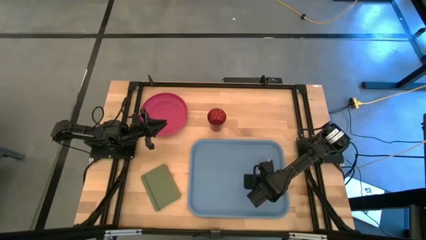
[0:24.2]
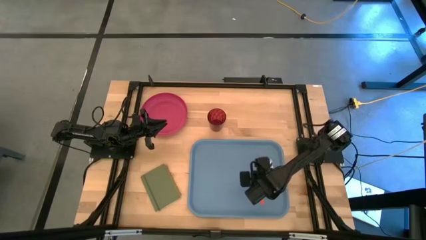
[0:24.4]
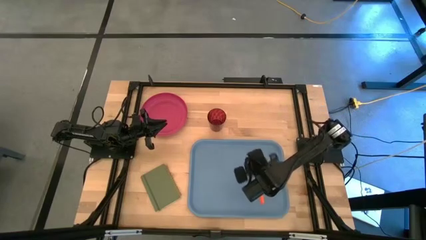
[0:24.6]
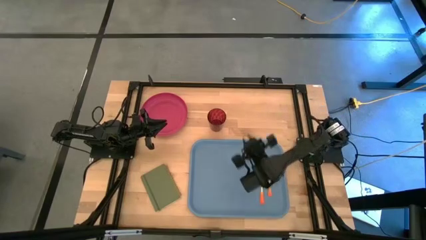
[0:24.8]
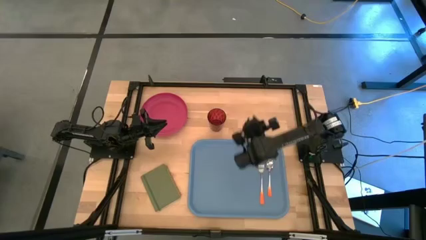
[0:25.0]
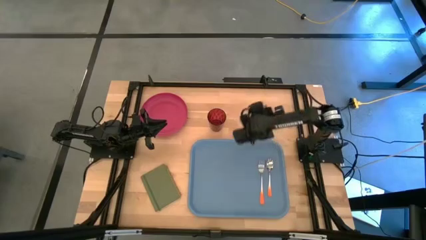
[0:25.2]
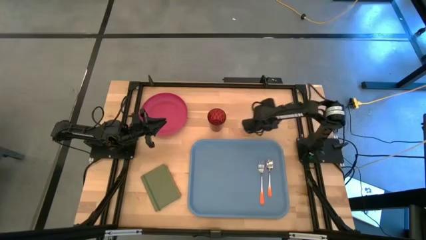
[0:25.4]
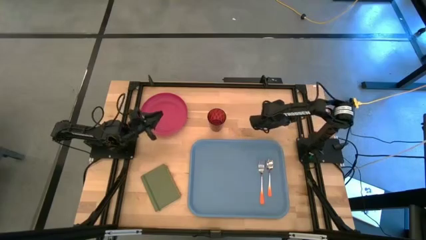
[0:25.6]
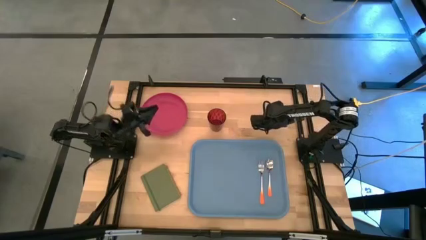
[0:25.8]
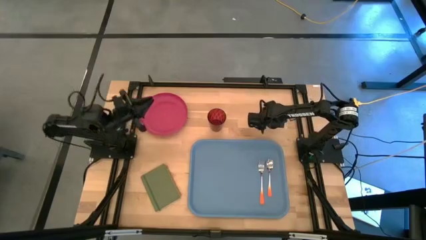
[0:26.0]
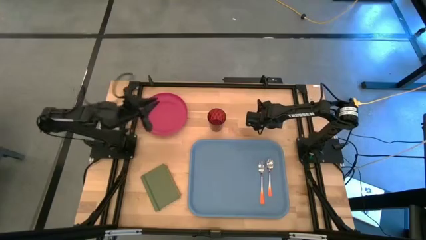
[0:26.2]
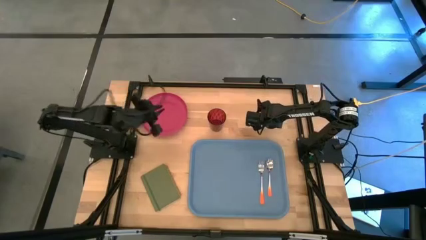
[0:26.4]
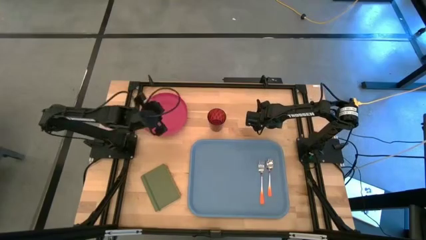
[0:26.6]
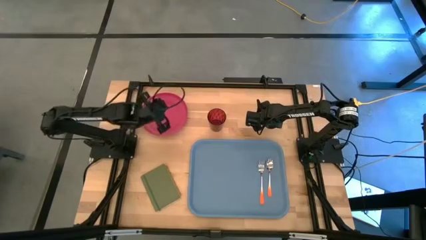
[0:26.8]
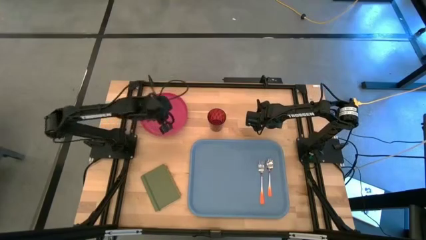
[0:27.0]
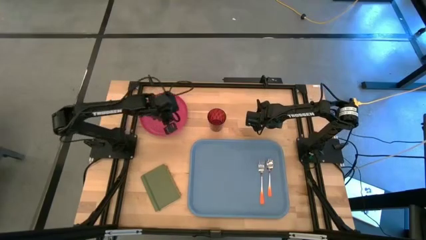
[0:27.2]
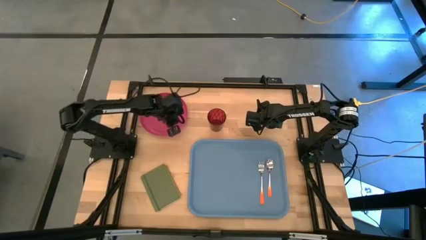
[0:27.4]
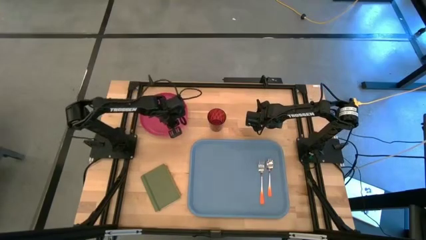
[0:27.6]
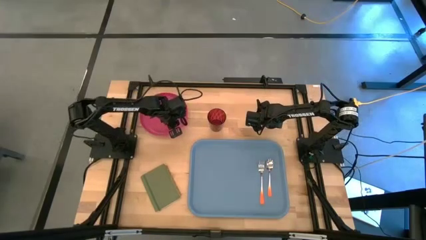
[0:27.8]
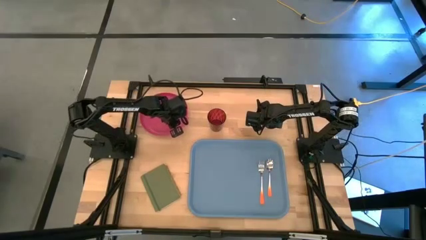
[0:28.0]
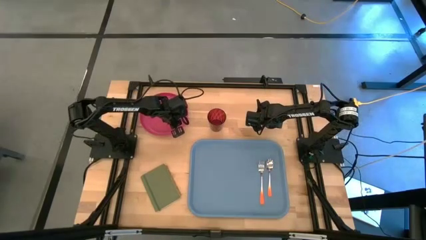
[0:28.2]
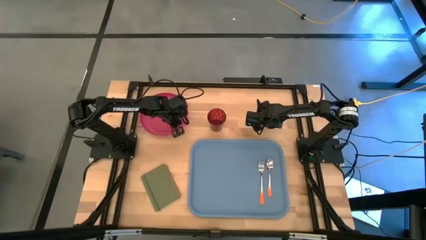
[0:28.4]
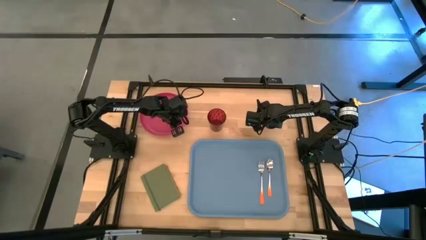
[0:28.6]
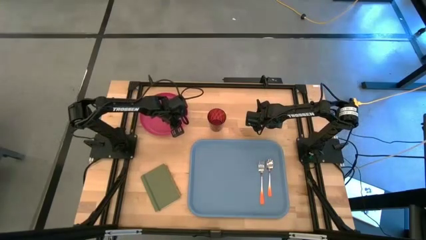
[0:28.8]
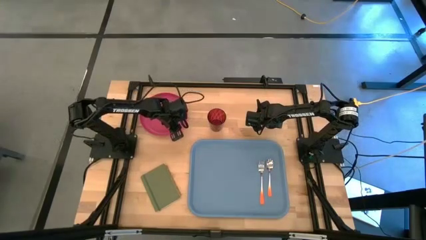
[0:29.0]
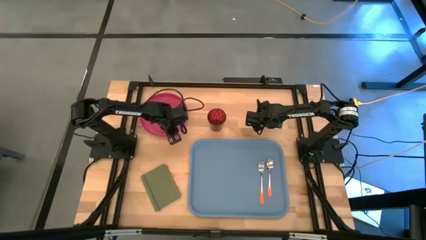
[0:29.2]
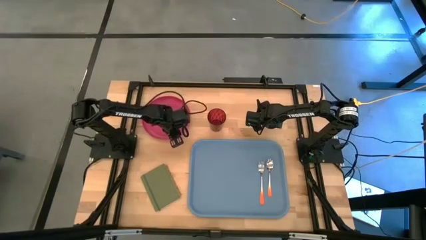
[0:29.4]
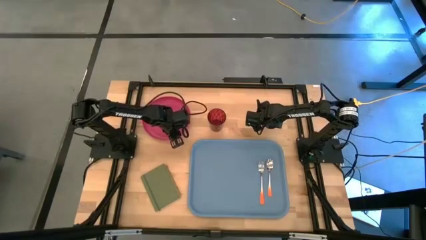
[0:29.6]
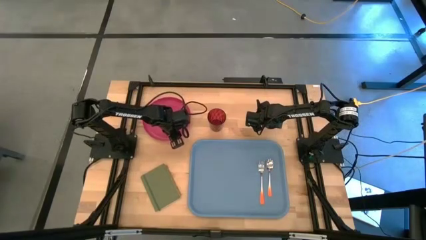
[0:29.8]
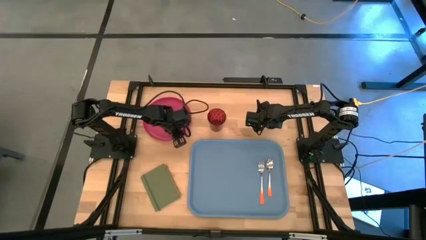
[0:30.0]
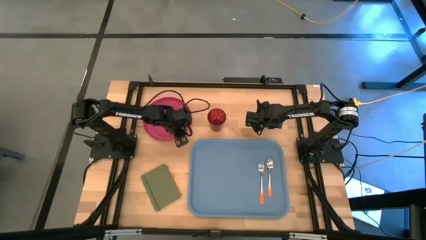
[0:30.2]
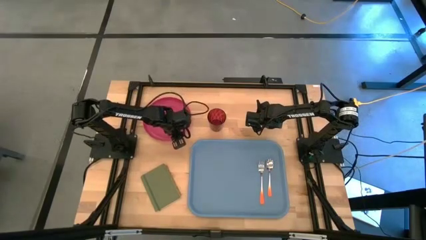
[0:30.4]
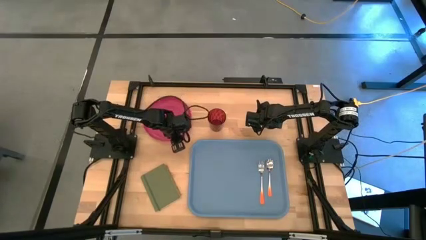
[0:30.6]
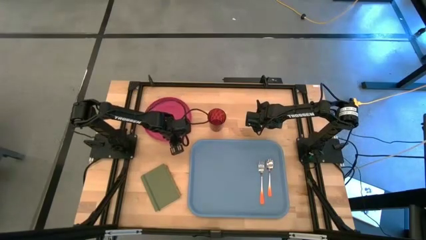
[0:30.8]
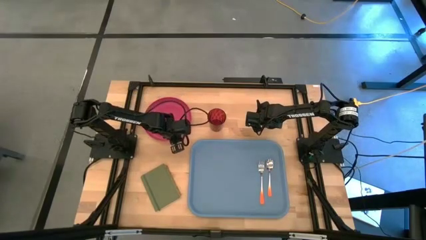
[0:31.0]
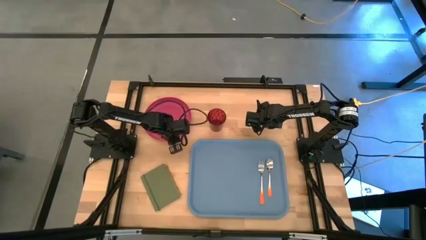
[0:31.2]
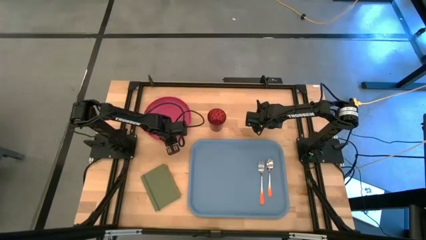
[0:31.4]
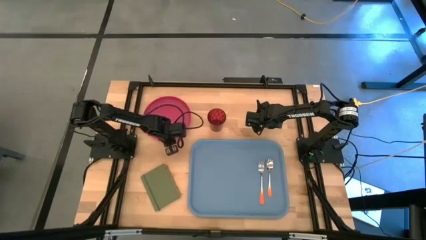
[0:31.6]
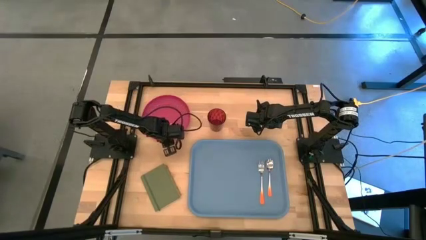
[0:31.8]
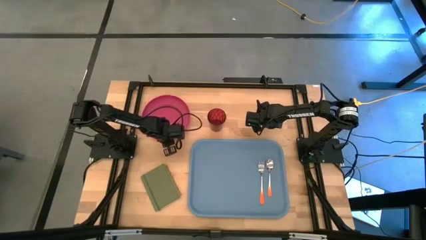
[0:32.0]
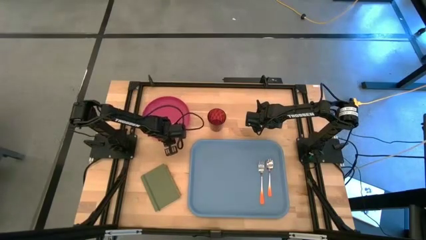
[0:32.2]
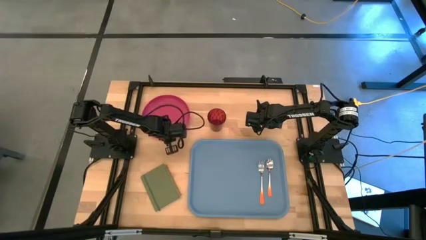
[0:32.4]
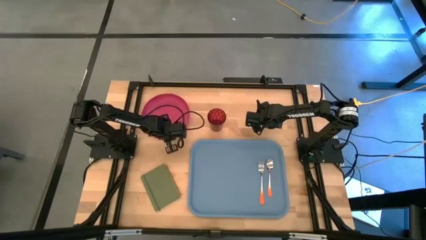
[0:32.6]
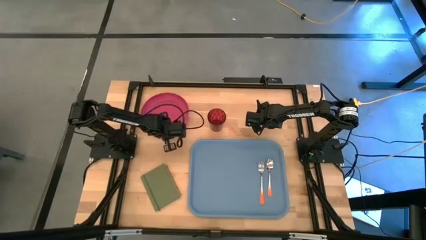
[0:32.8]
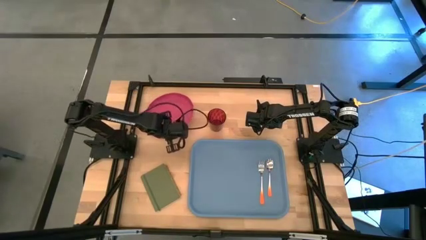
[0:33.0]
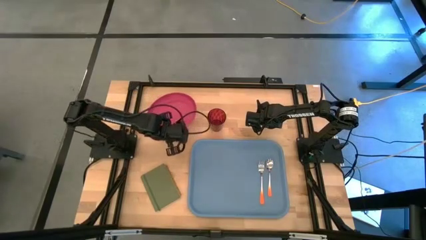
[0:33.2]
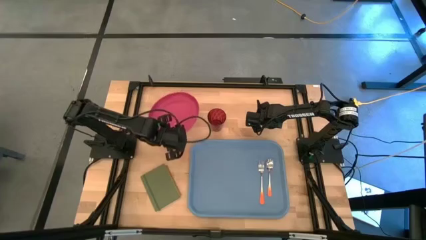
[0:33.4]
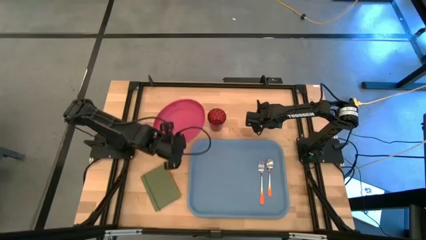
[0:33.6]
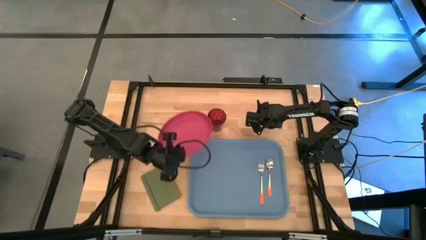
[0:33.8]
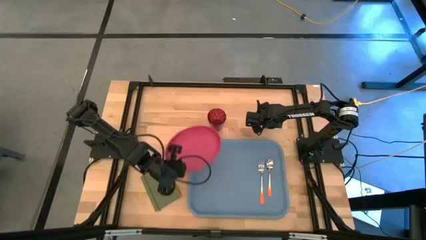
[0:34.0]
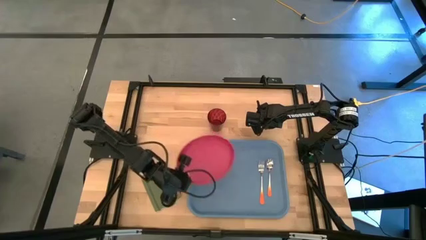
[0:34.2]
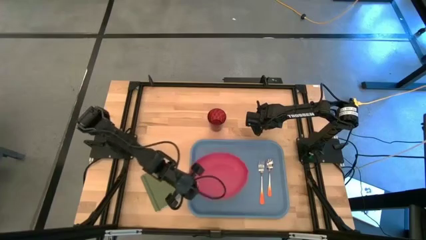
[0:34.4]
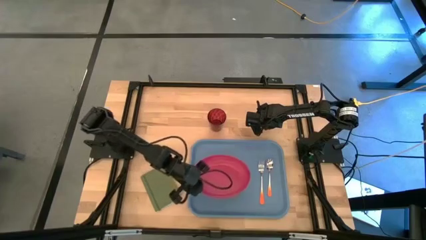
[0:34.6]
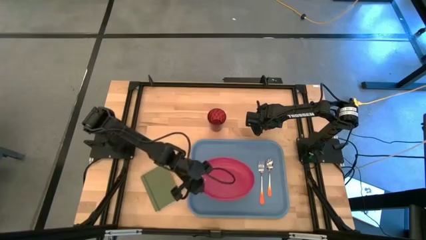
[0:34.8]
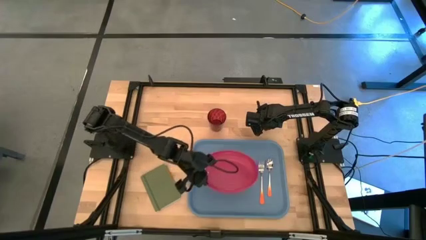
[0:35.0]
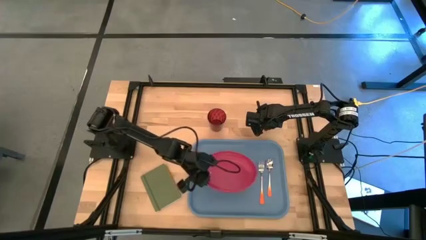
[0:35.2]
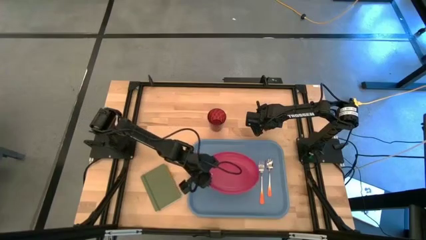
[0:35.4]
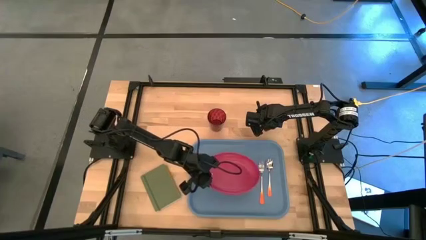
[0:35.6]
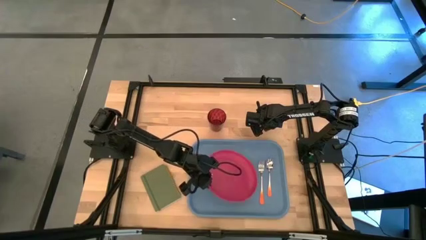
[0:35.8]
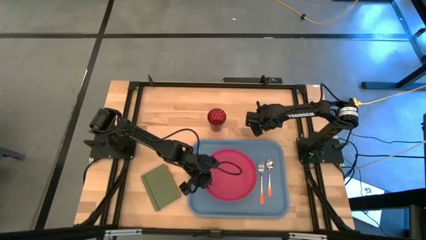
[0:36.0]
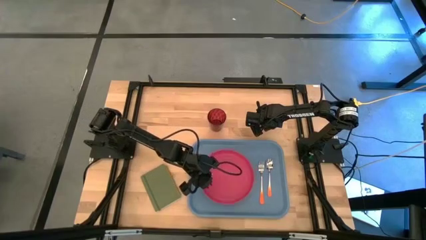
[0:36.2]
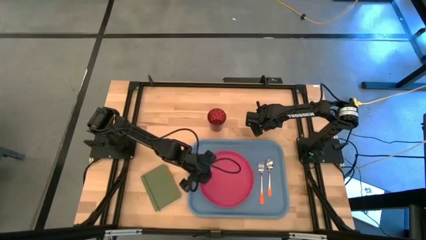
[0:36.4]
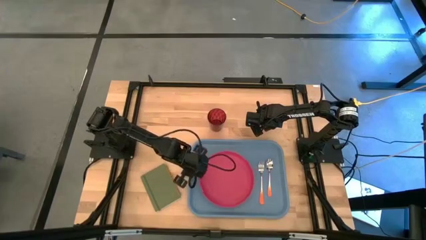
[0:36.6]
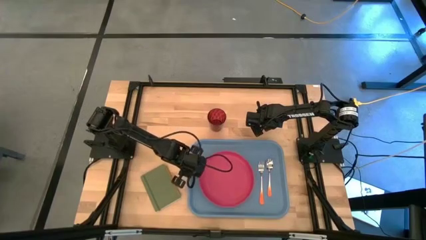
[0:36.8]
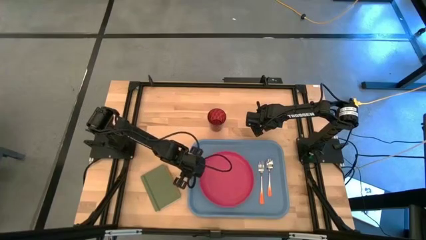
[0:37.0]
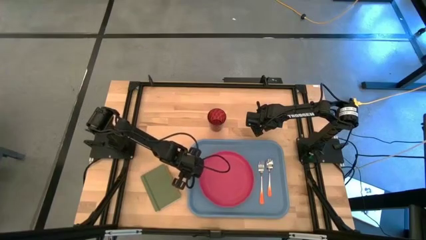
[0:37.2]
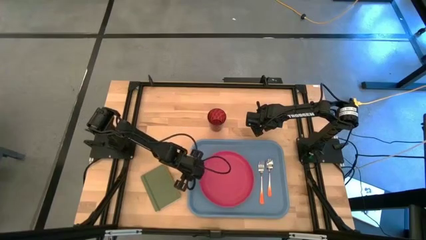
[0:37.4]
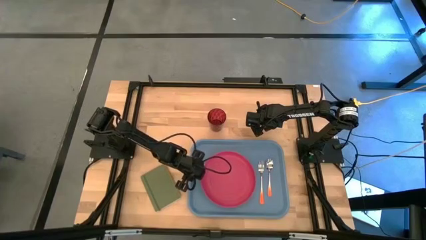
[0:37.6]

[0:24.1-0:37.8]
Task: Pick and place plate/cup/fork/spoon on tray
Put the pink plate on the blue serving tray to the left of the orange fork

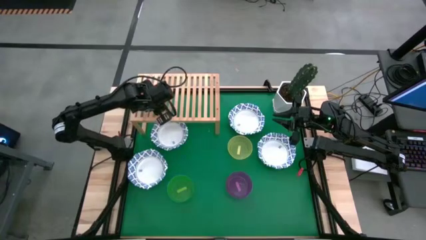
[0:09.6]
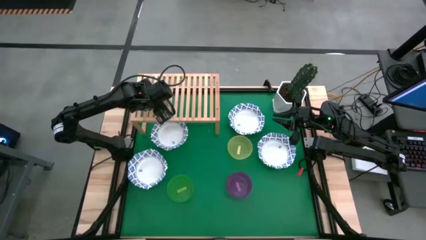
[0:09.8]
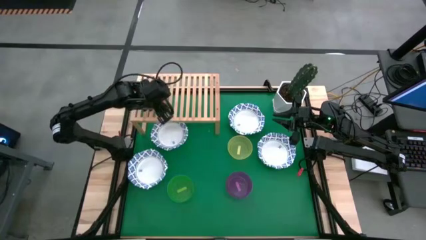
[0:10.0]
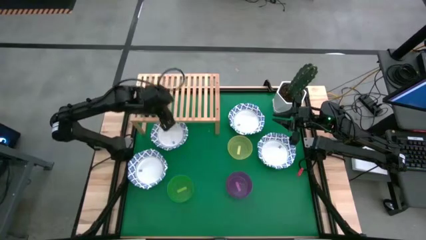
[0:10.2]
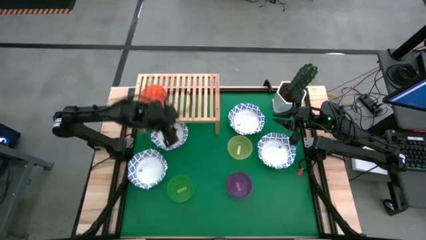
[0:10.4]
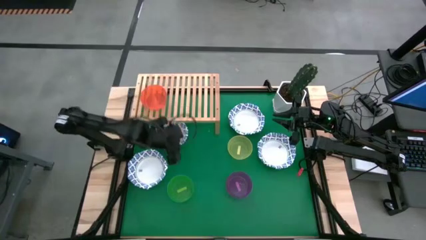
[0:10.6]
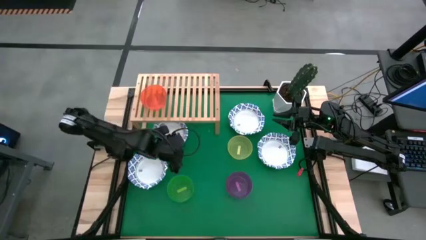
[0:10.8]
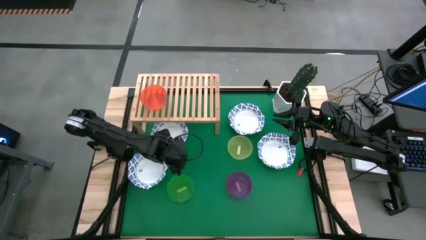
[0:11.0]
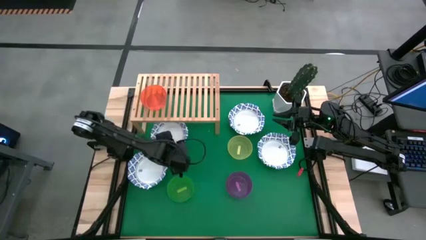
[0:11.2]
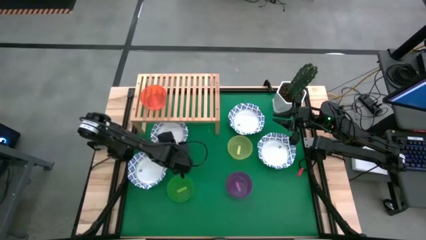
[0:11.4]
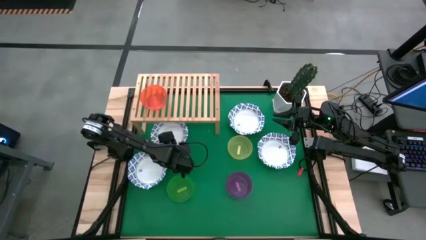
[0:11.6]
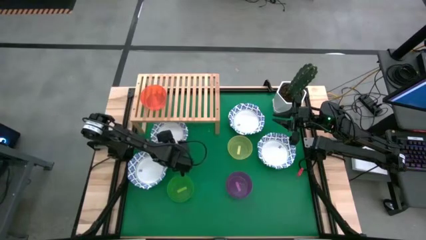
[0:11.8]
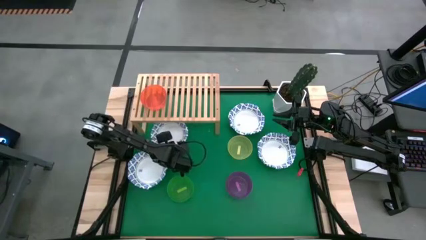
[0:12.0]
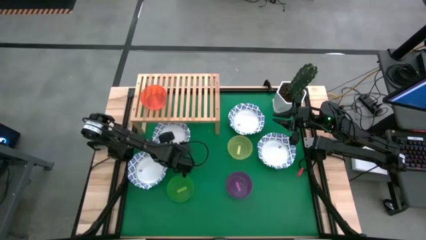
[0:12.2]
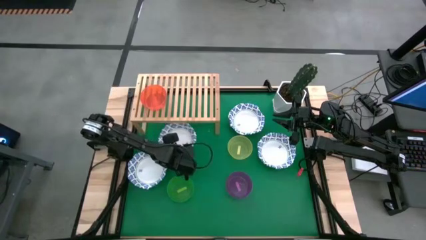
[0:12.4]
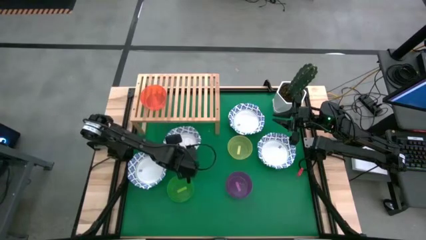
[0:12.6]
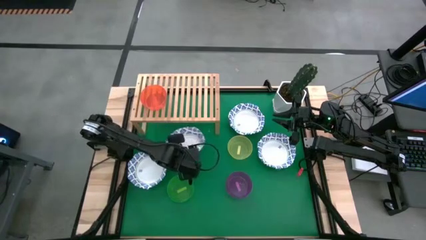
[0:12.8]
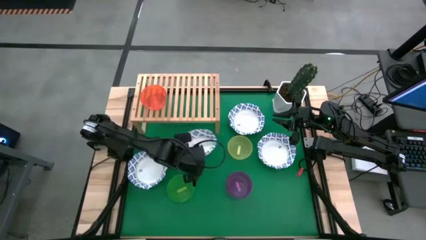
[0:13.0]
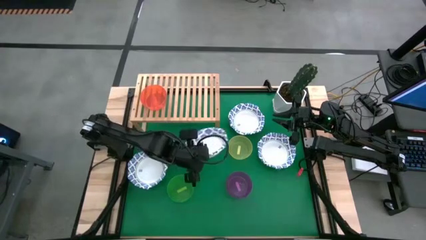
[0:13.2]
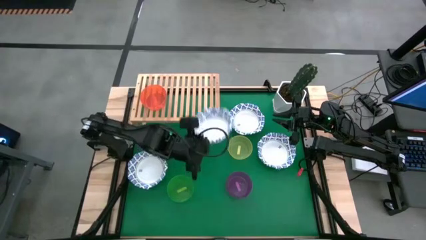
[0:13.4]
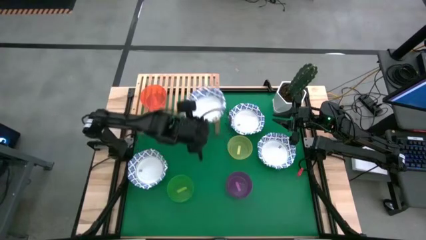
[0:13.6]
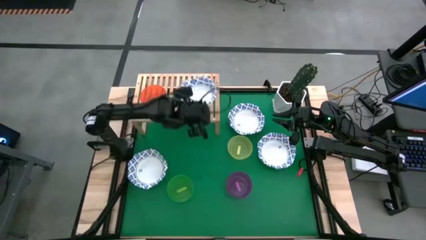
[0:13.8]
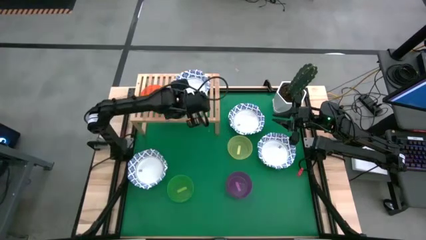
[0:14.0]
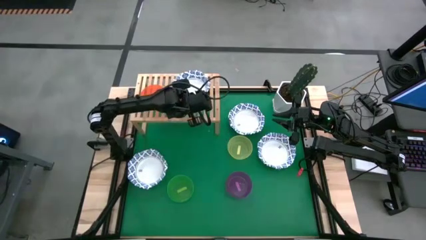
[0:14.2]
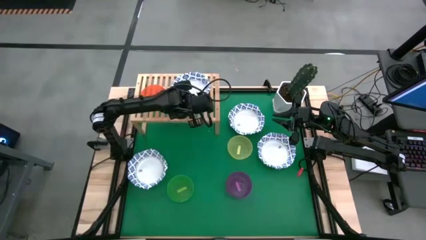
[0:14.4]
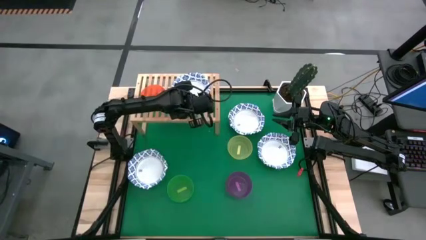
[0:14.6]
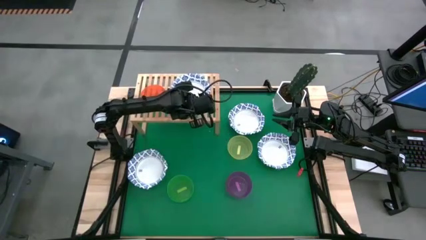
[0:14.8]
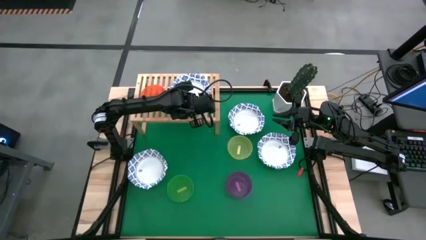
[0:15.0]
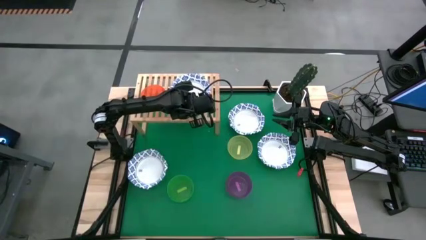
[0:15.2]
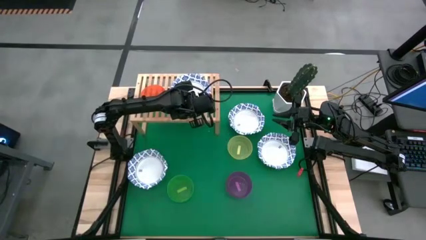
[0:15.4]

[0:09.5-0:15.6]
Task: Place and stack bowls onto a shelf
Put the blue patterned bowl on the shelf
